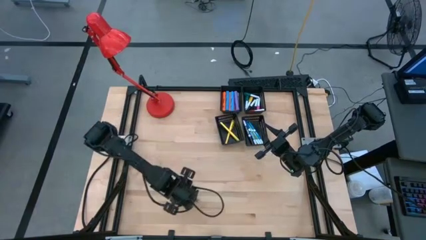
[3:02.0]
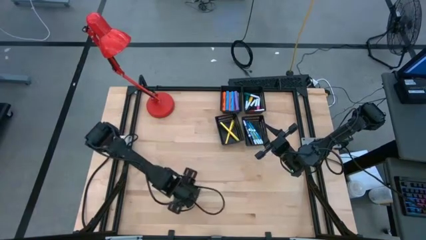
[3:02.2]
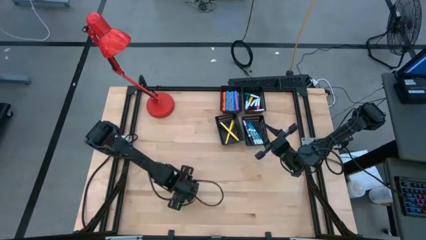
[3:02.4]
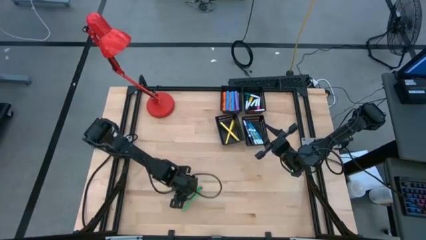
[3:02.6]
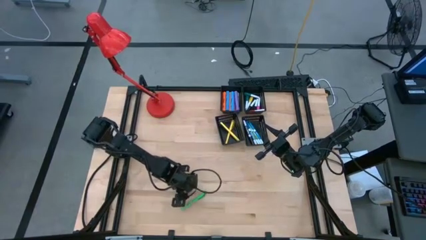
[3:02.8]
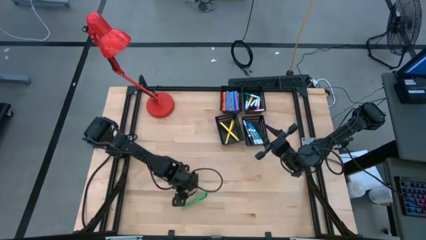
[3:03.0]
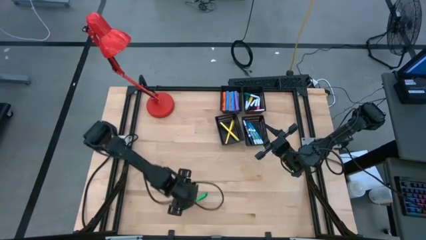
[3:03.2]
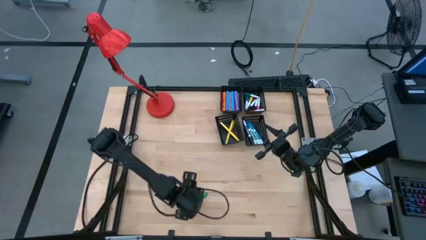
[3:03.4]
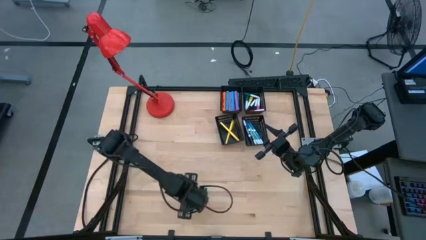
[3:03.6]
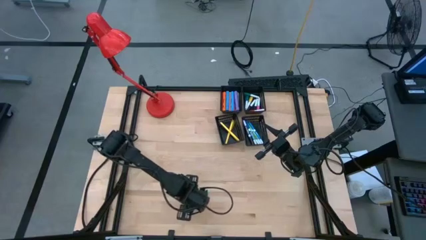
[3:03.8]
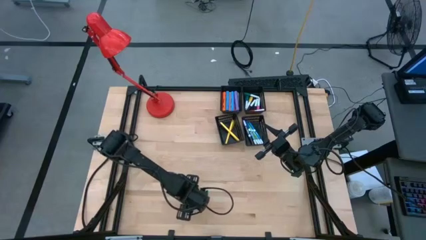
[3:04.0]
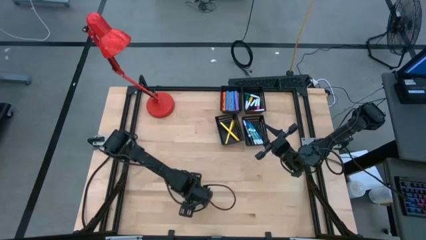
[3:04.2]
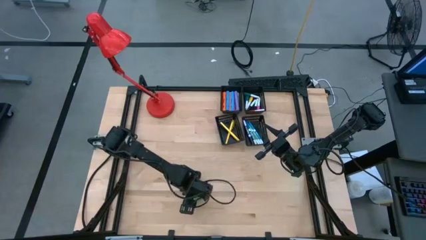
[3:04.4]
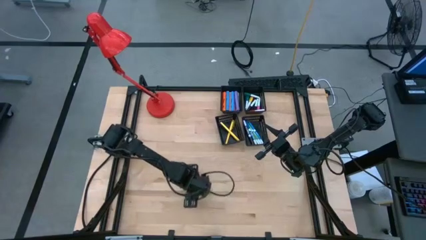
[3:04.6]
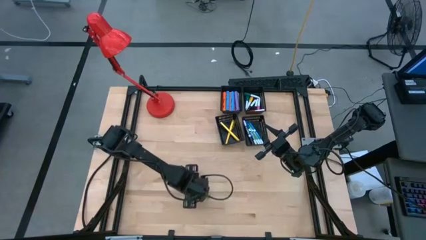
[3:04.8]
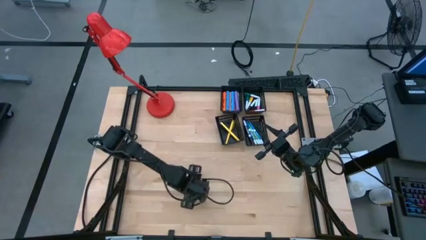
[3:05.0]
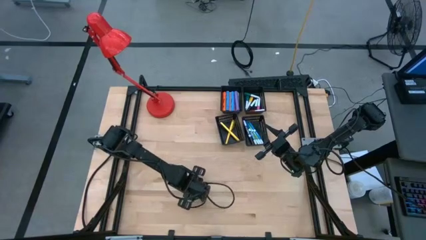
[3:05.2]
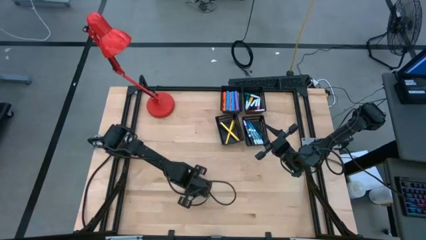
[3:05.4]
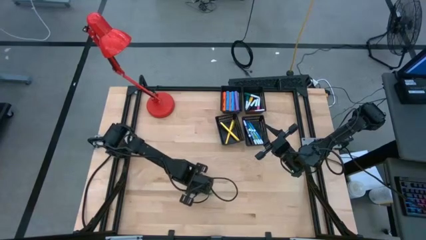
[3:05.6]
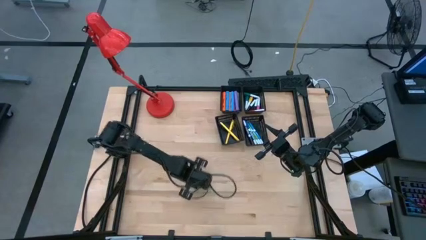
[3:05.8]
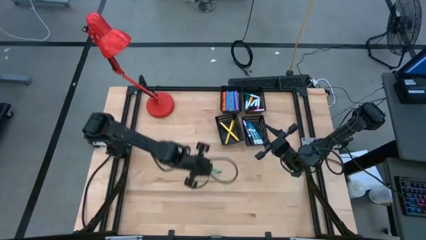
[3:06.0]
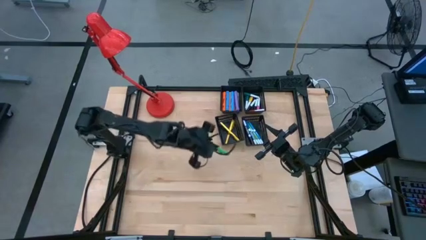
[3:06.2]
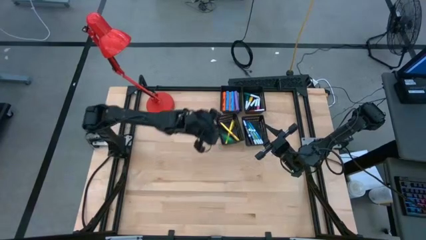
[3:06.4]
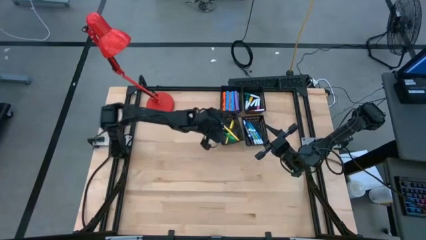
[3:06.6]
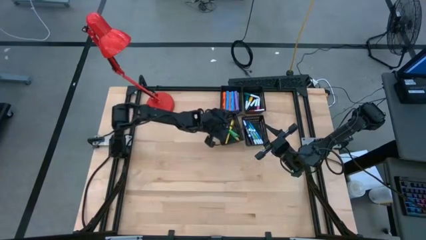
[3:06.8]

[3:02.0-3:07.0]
Task: Pick & Place Markers
Put the green pen into the bottom left black bin

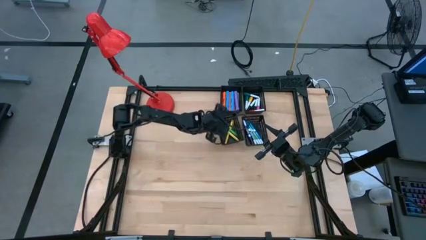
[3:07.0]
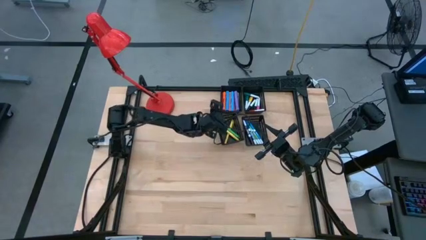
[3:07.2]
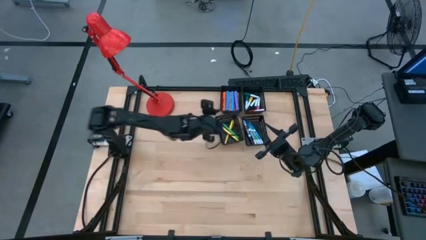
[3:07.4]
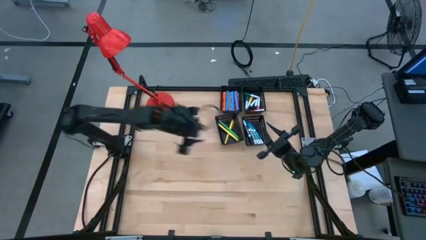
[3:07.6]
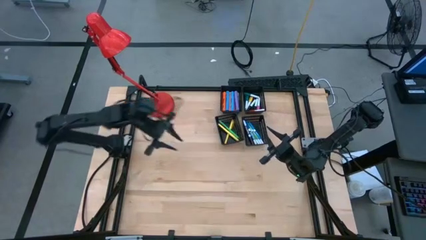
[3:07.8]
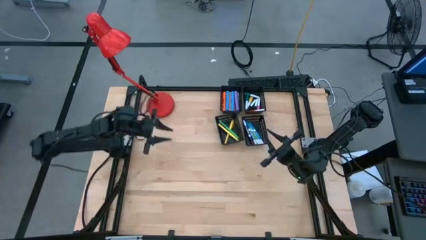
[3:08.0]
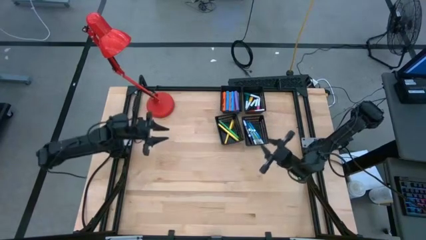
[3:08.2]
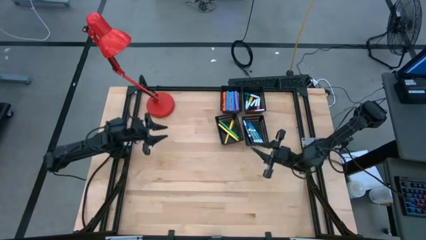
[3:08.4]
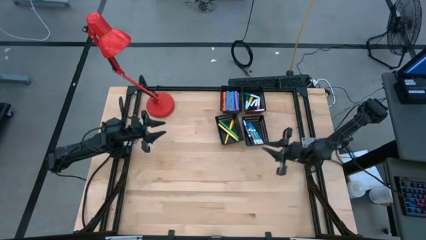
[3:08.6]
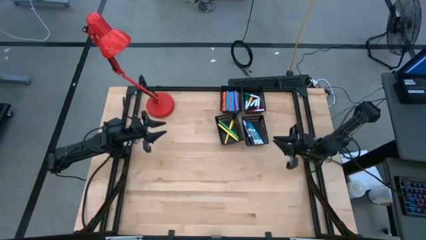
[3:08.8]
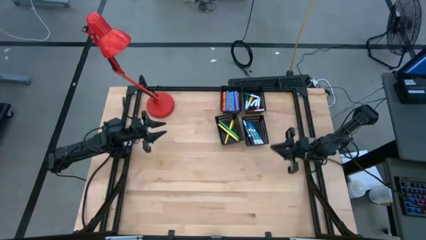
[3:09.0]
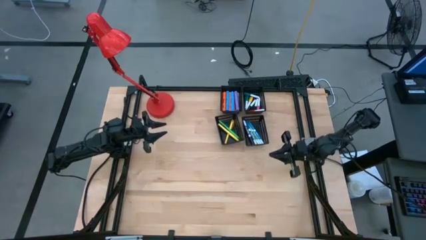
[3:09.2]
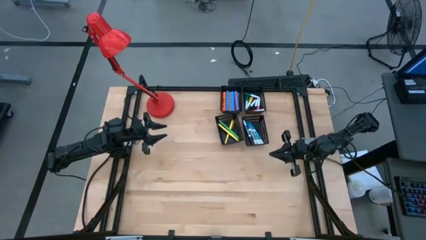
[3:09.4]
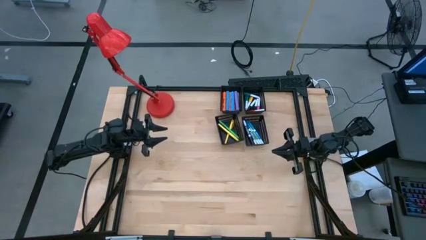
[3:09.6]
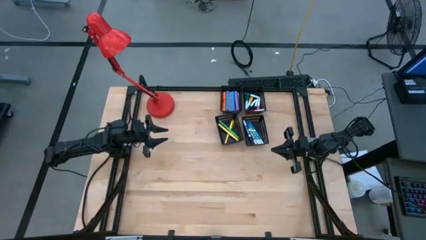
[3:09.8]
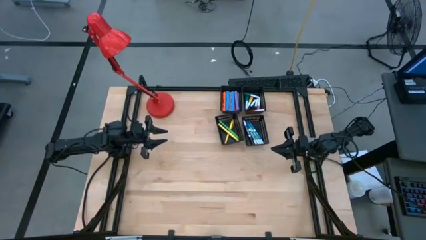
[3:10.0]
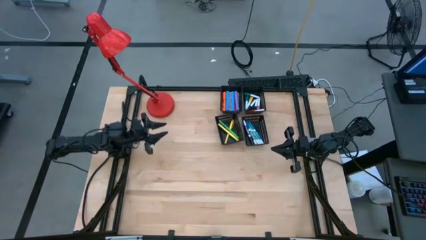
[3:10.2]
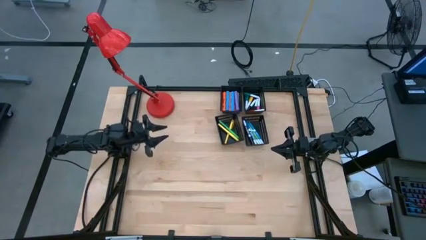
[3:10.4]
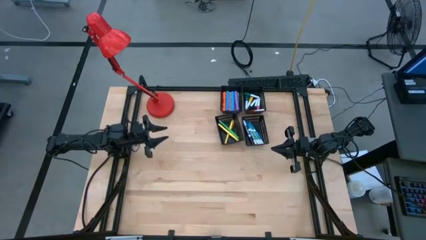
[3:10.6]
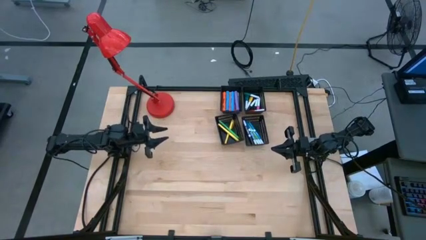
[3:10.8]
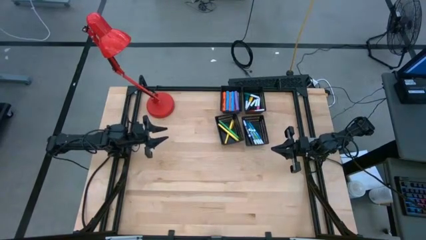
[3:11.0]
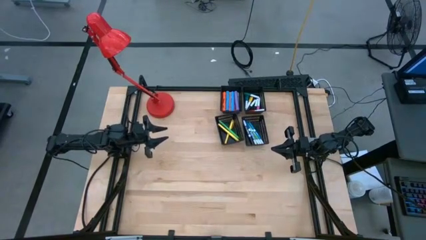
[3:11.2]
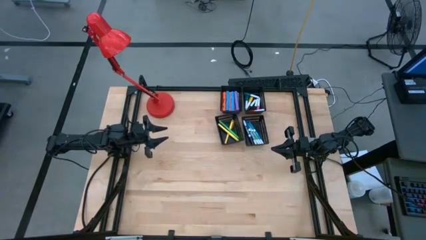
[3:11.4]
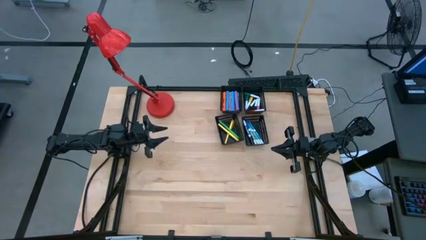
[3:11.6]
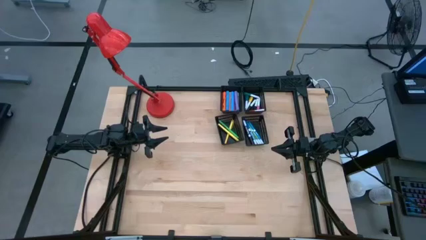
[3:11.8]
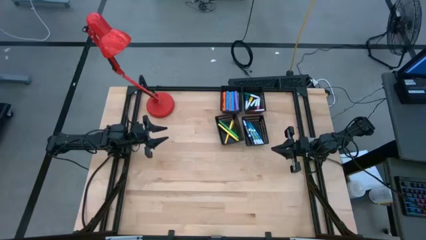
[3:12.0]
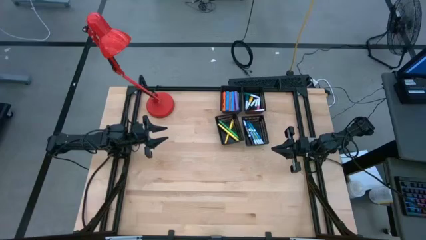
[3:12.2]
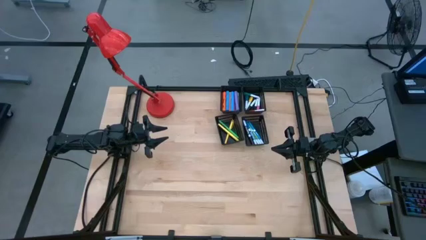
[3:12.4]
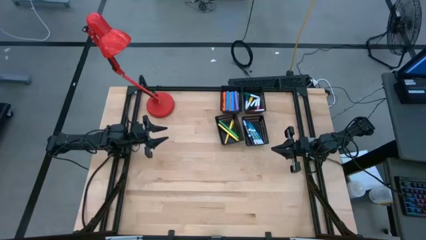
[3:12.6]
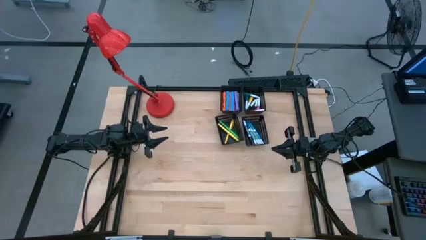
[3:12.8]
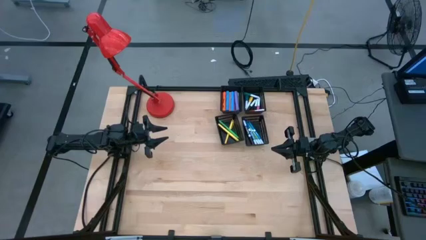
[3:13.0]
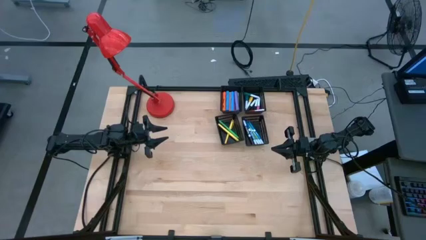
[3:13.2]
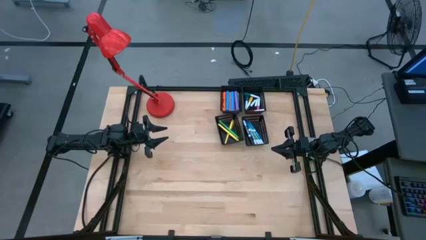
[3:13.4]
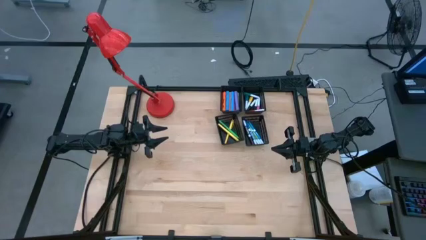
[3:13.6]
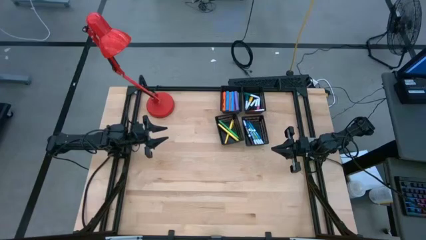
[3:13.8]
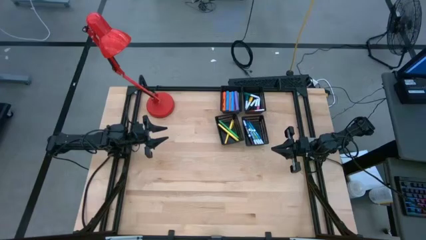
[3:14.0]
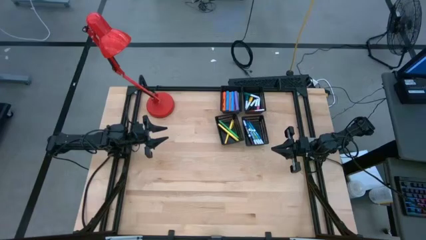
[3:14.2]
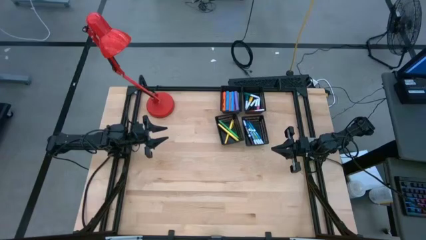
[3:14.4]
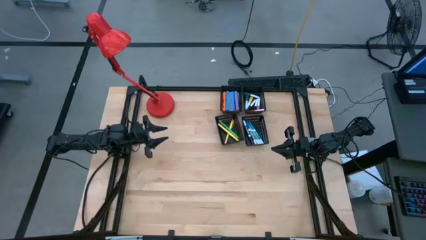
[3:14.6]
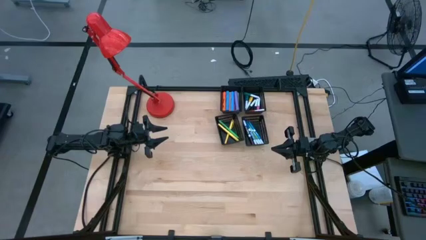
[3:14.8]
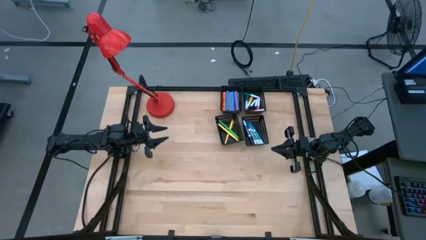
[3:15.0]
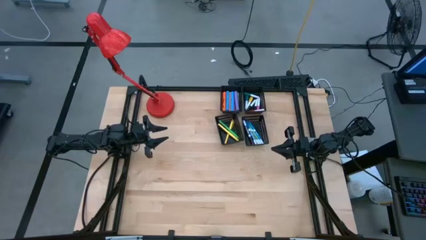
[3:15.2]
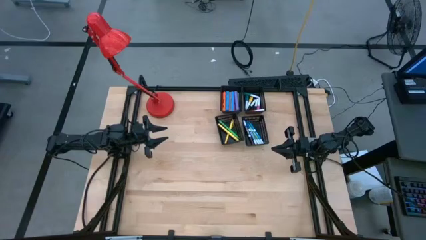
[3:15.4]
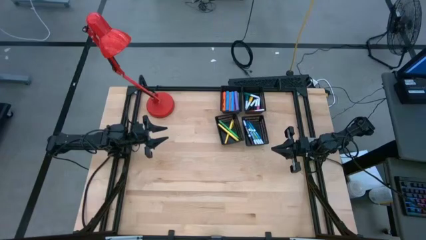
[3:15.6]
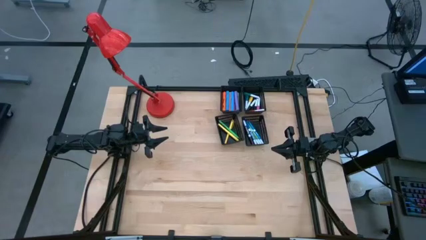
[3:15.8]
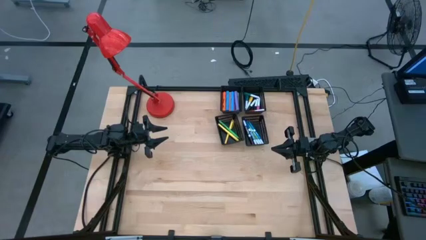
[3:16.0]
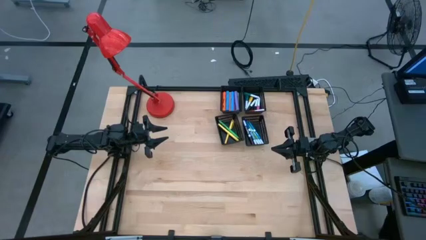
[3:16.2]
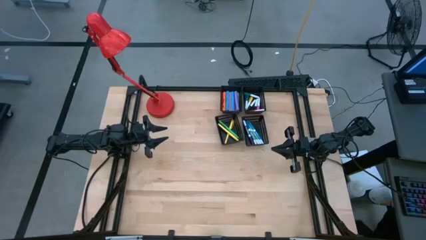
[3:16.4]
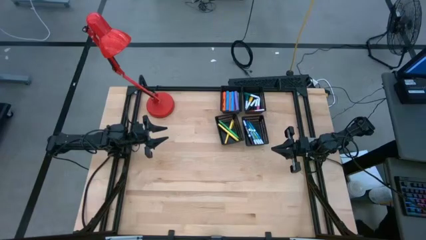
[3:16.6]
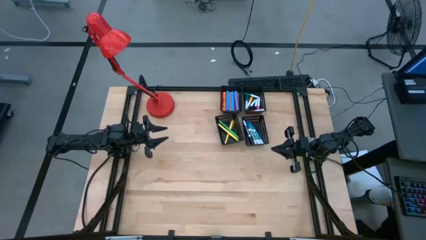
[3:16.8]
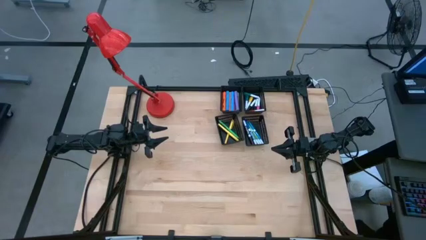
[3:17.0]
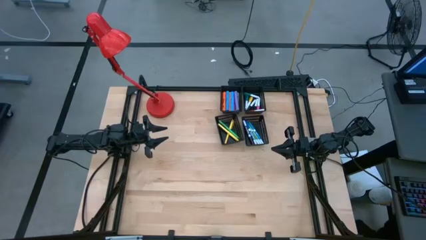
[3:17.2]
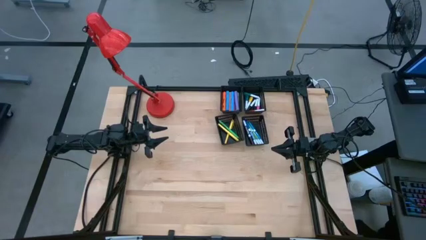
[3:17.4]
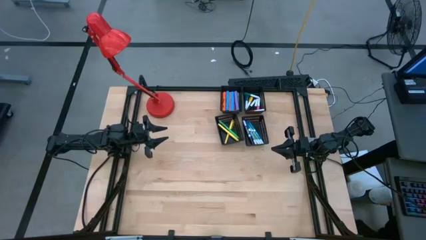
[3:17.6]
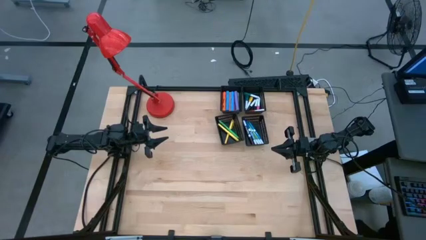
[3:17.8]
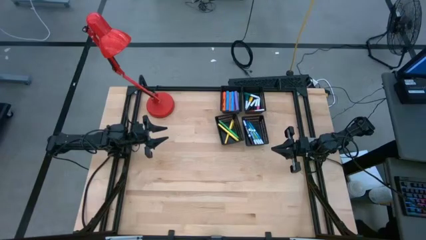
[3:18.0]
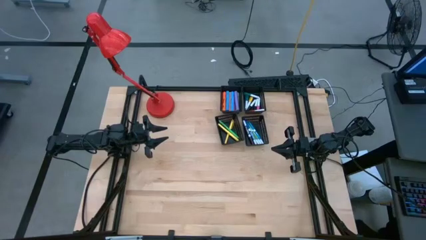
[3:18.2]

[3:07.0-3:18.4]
Return to Home Position
